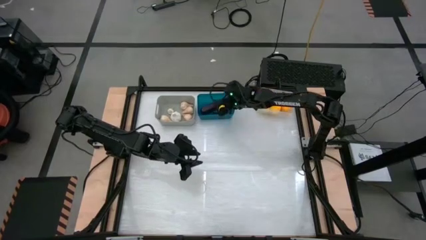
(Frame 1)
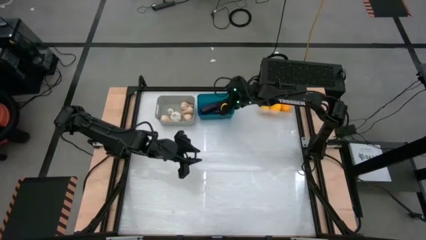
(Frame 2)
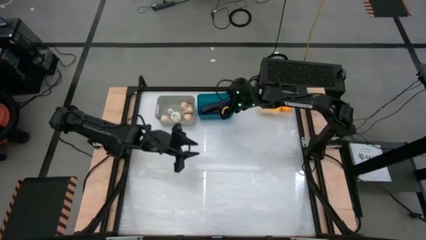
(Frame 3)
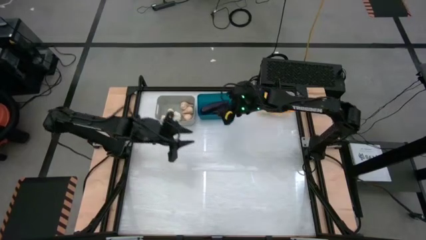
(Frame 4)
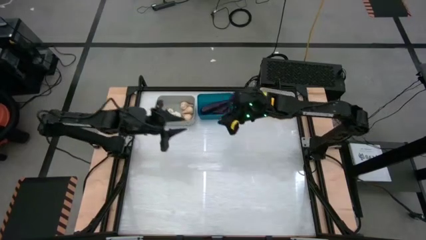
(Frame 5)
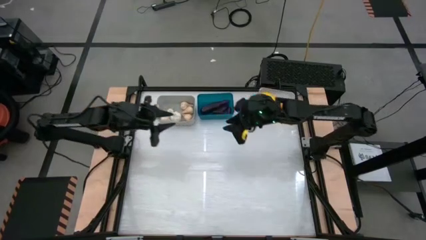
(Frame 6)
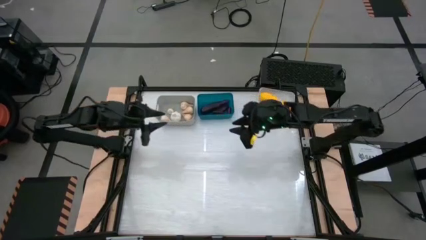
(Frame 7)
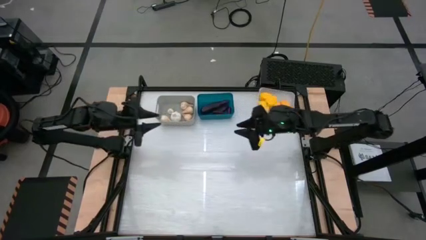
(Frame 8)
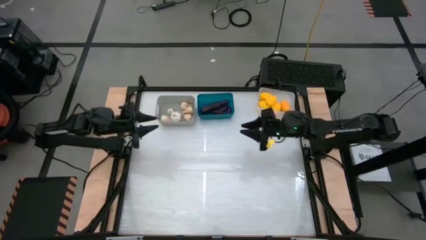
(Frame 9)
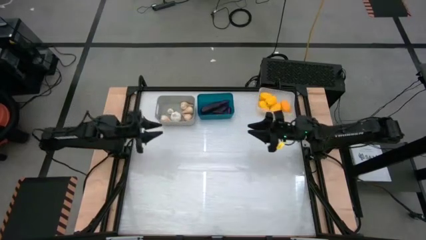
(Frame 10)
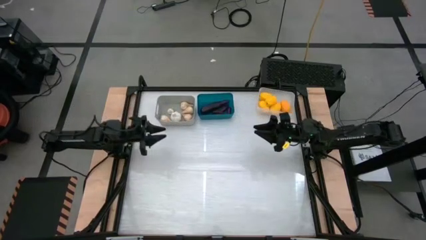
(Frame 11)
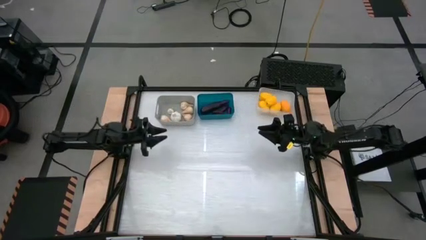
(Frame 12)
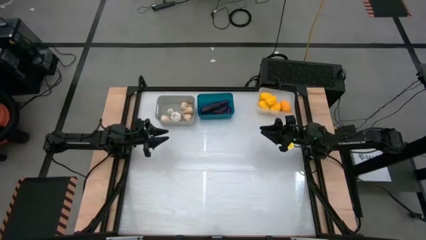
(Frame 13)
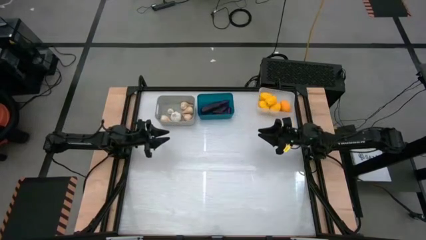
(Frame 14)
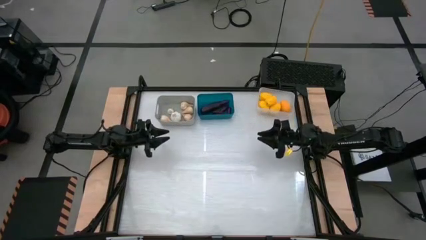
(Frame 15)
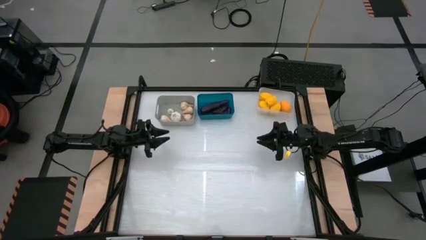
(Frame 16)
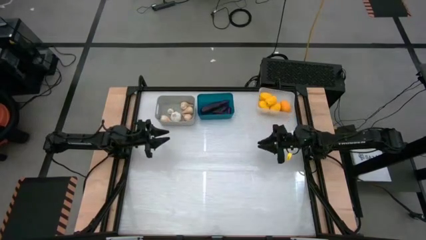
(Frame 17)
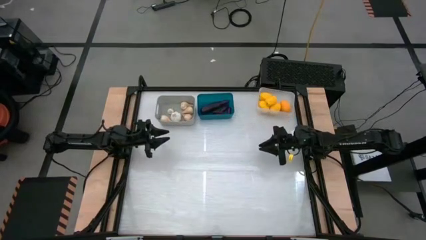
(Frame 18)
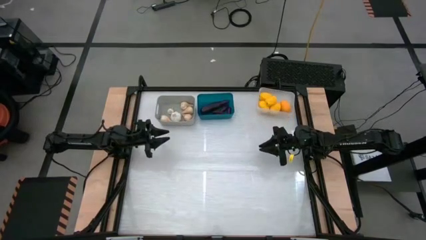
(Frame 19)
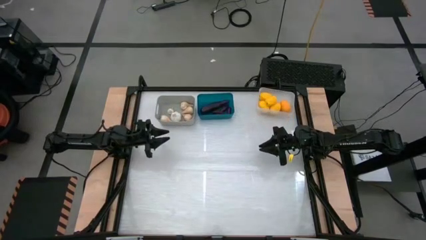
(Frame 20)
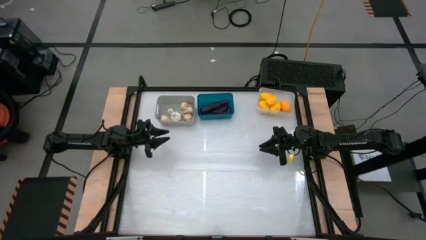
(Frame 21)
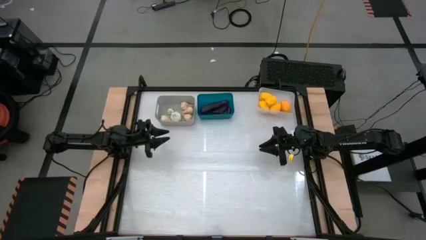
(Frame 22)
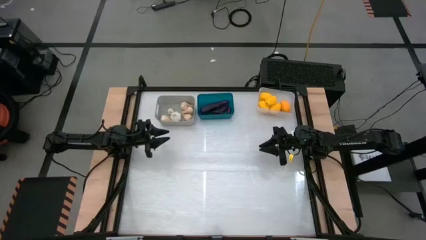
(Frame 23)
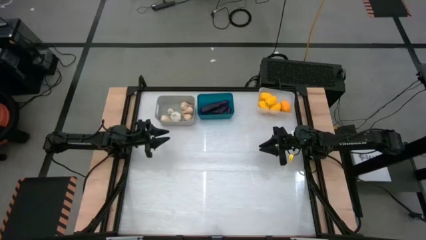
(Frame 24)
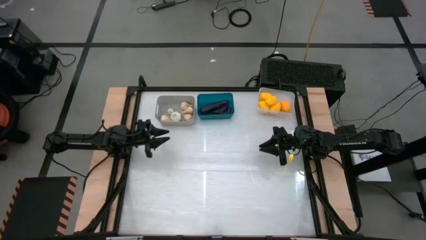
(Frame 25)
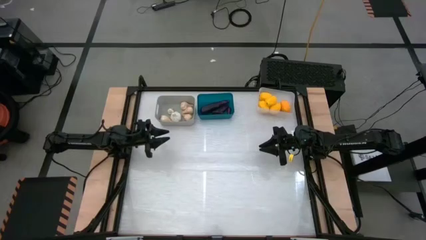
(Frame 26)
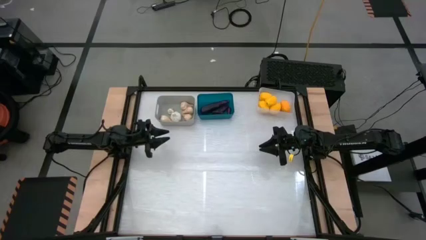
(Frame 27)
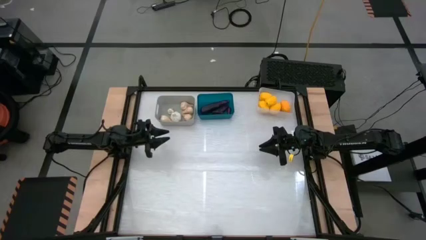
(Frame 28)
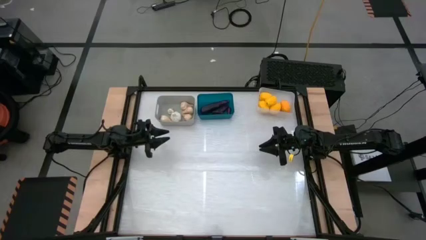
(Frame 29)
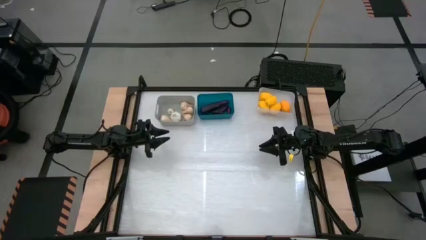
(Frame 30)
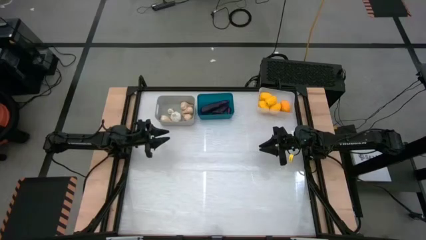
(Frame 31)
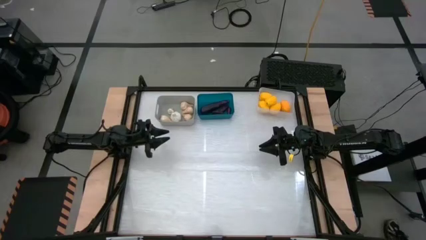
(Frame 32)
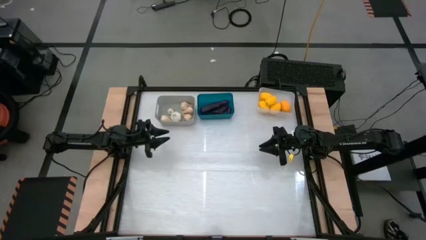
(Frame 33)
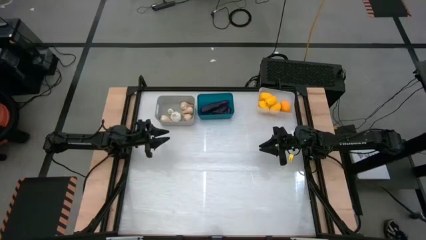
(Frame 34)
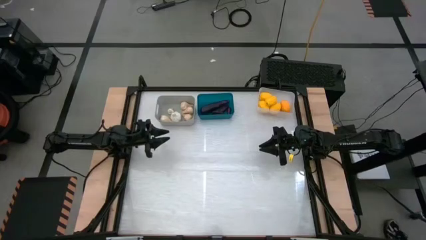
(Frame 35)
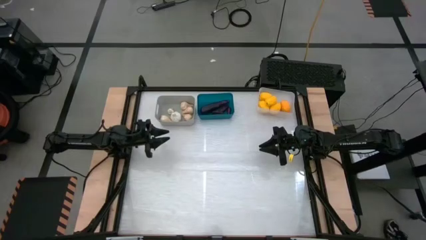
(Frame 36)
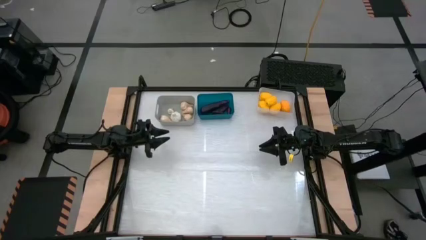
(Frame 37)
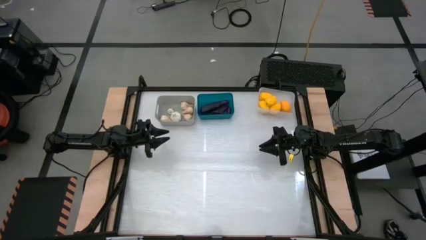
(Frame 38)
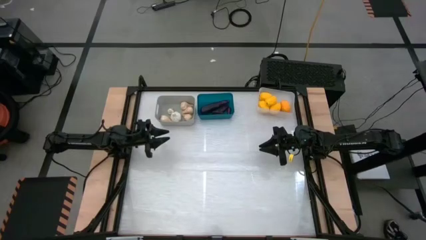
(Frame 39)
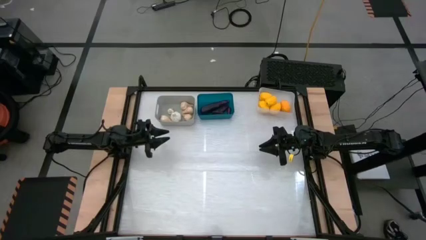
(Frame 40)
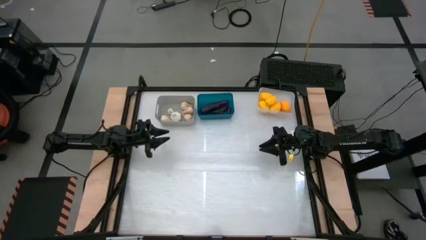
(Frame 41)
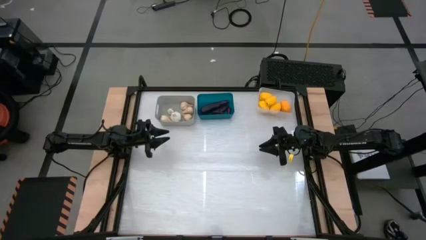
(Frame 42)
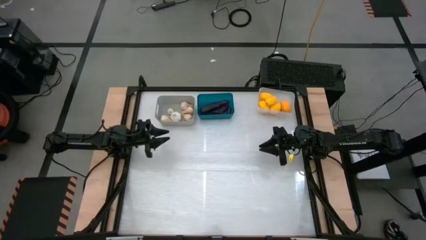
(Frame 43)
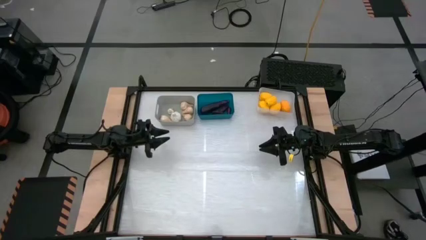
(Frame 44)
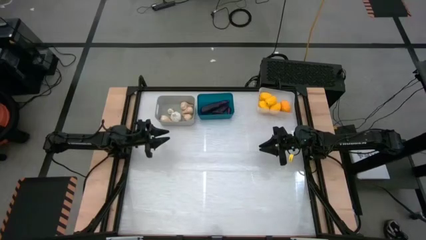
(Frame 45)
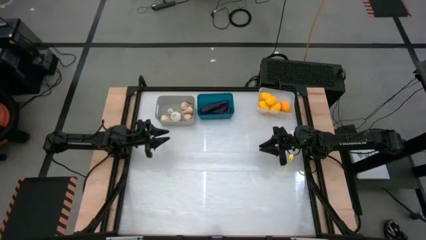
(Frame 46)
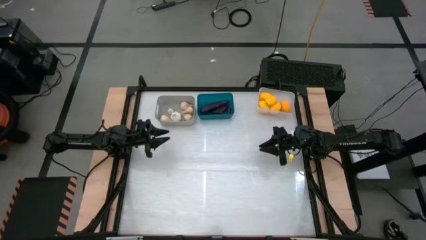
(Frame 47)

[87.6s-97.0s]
Task: Sort produce into baskets
Return to Home Position

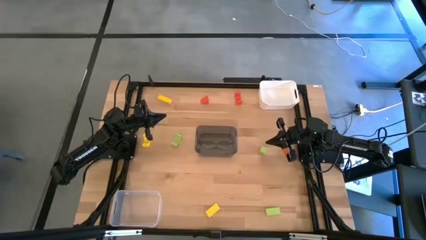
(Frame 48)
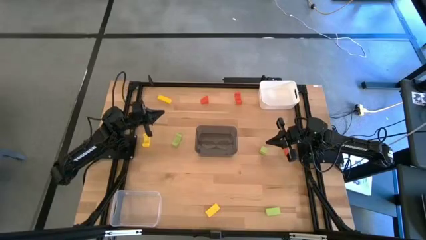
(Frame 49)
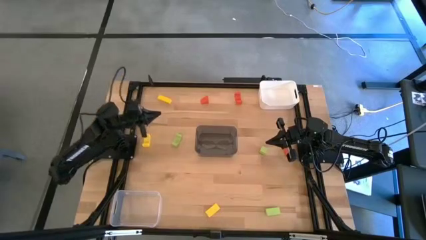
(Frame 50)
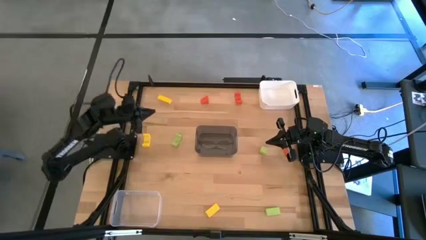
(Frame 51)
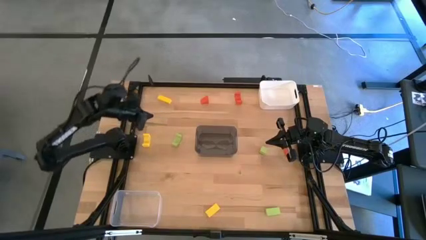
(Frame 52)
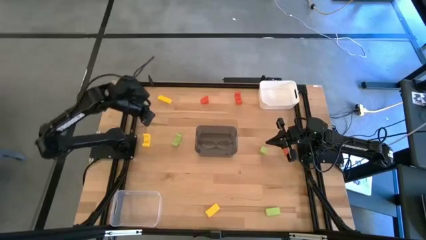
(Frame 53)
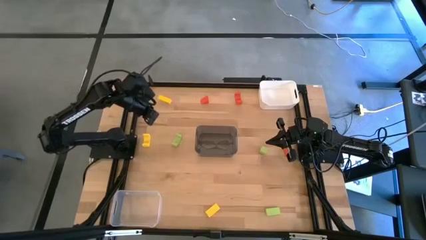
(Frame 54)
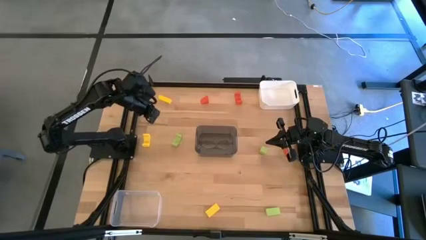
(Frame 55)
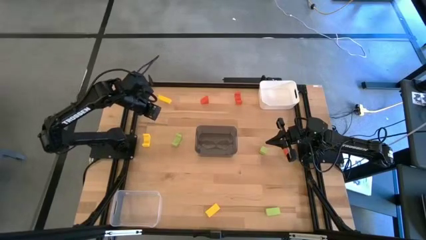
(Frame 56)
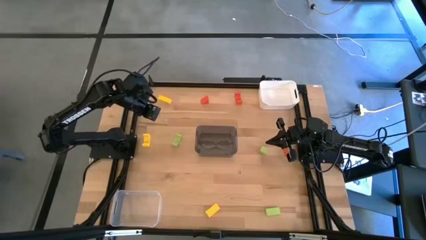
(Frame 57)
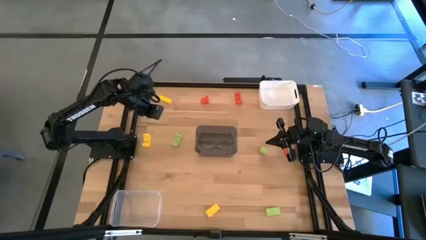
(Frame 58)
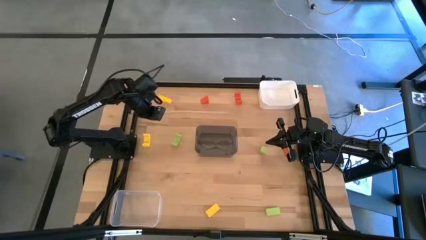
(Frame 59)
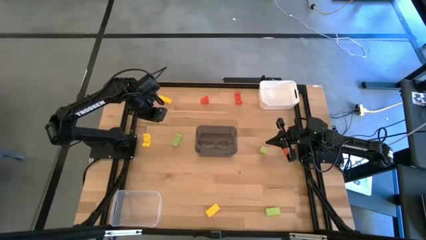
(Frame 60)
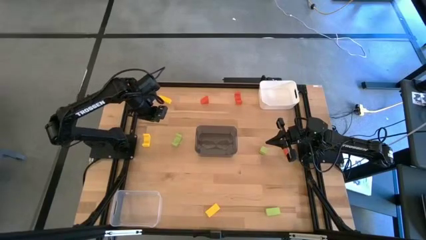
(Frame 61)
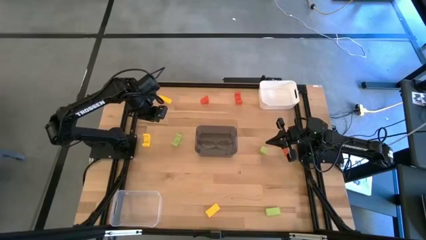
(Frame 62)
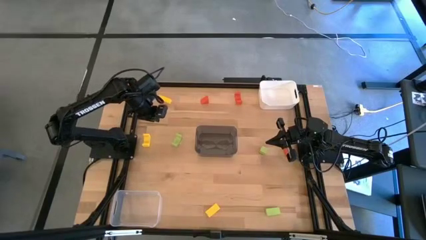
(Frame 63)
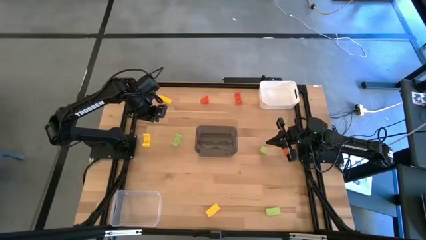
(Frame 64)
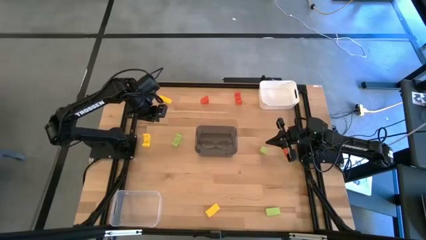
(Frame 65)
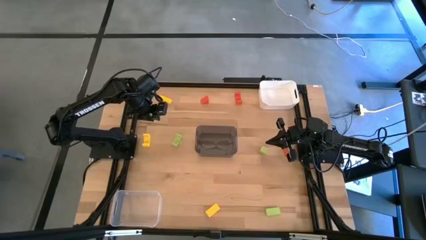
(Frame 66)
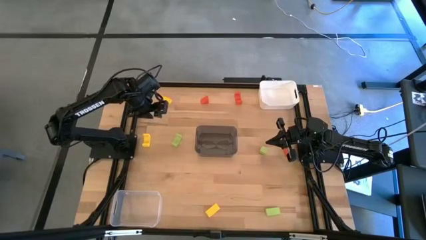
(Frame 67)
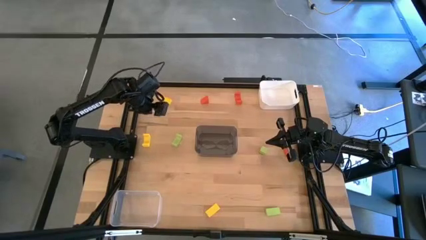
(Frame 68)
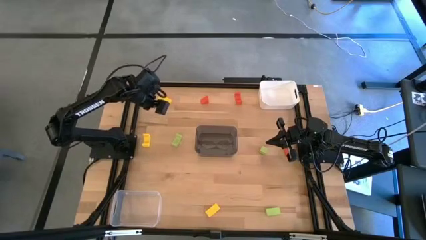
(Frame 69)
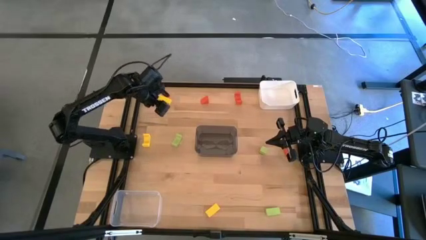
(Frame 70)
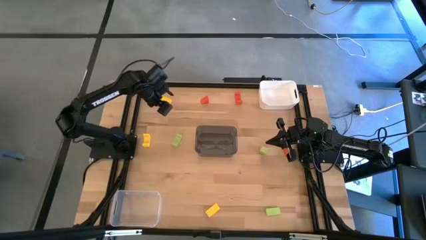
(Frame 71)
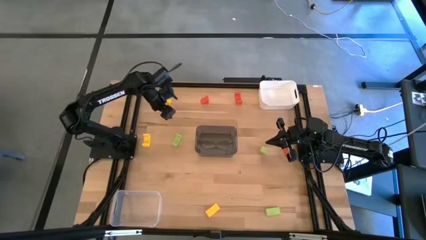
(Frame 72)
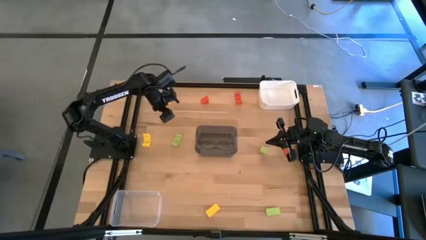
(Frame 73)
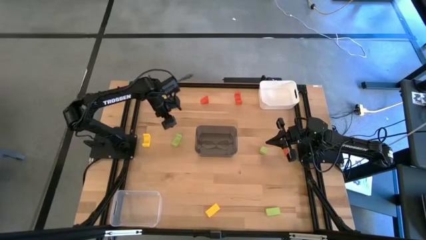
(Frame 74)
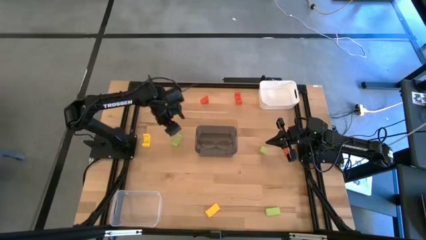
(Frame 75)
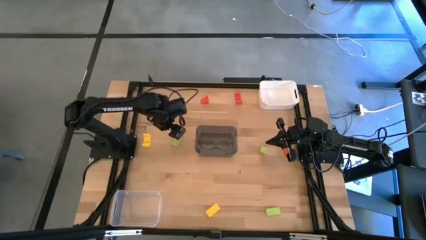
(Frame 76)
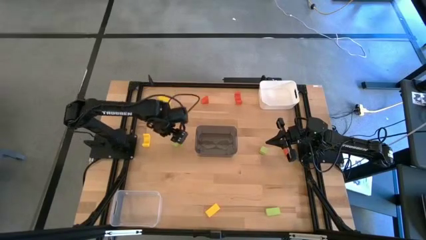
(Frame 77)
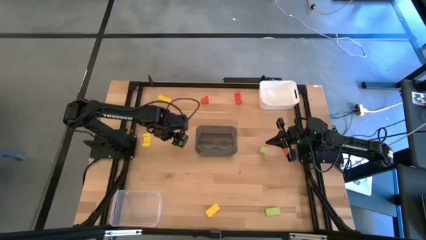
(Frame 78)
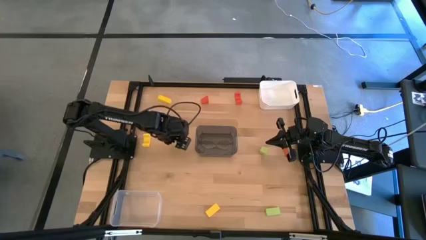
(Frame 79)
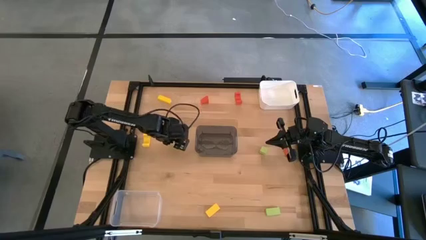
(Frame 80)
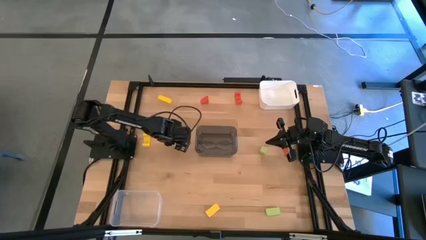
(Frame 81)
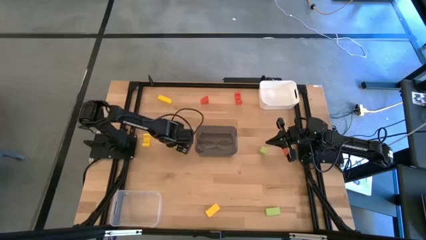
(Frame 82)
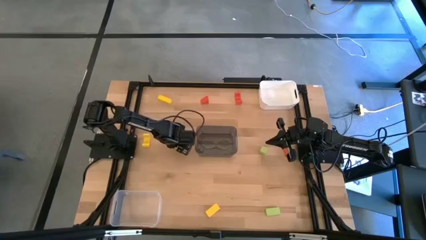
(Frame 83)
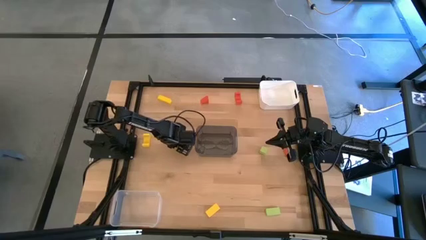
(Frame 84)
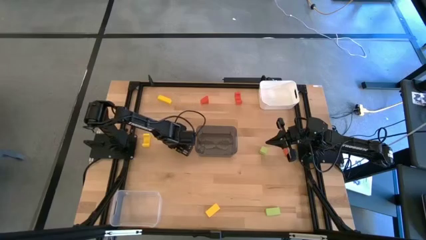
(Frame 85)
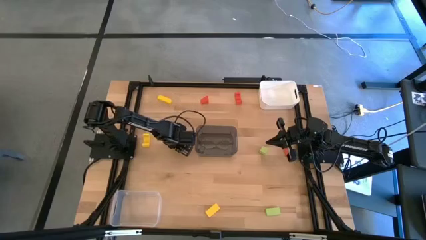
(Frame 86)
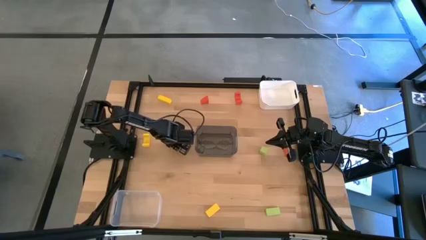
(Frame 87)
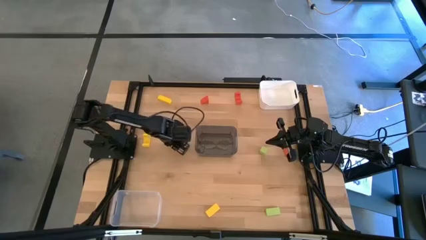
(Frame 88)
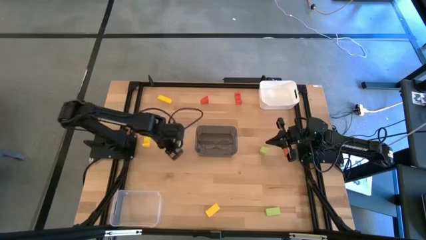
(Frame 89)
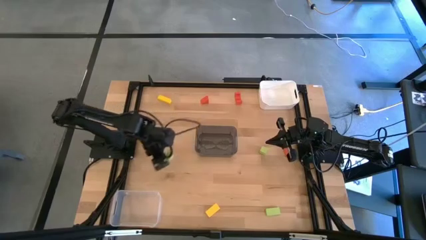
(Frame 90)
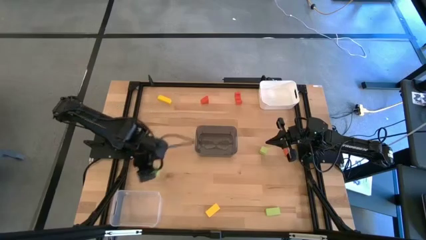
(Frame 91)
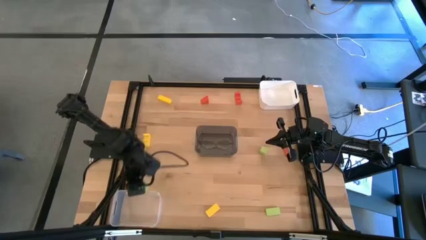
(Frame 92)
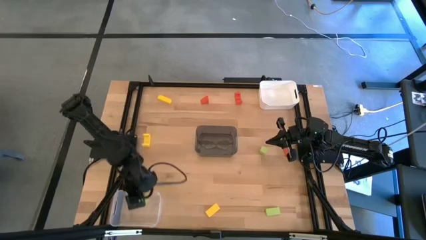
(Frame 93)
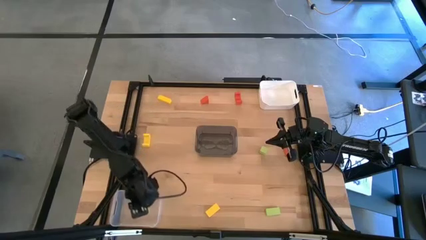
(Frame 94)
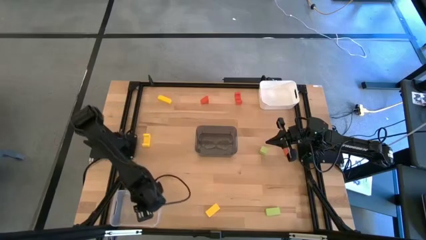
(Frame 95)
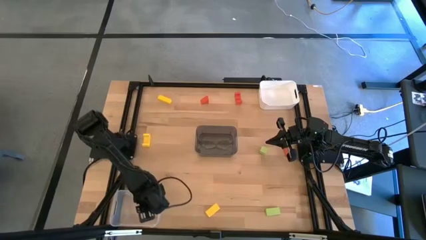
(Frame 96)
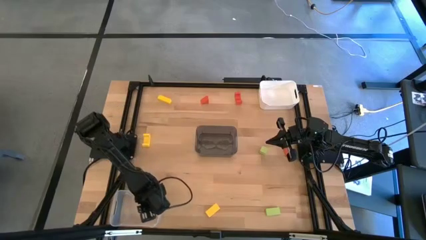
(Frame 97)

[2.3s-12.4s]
Task: Sort & place blocks by color
Put the top left green block into the transparent bin
